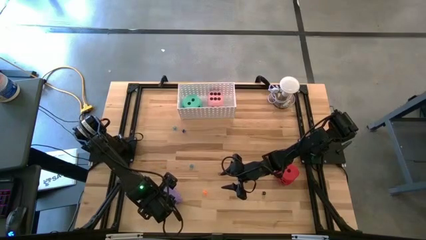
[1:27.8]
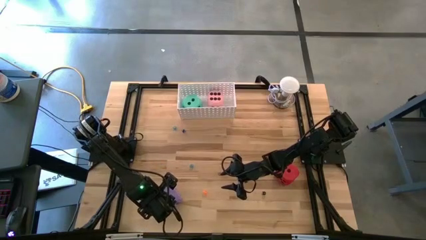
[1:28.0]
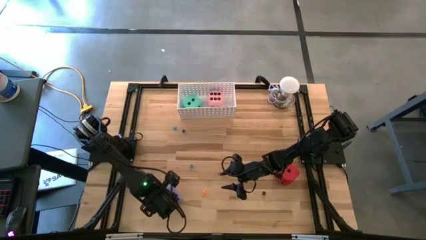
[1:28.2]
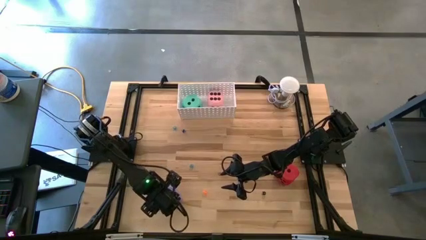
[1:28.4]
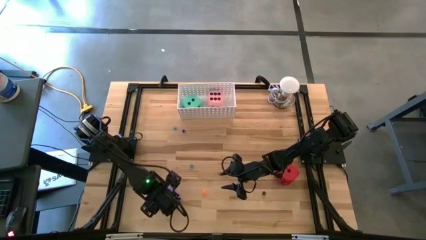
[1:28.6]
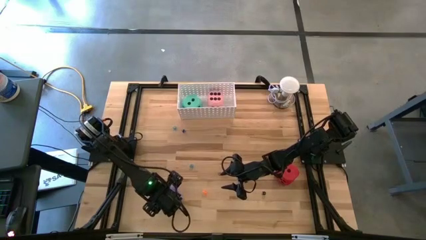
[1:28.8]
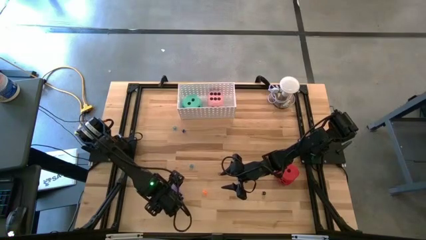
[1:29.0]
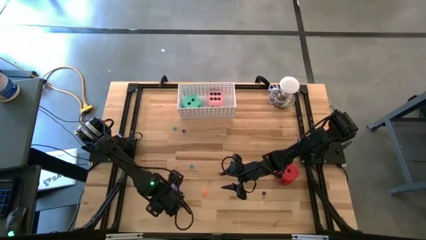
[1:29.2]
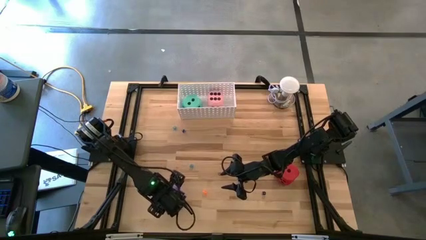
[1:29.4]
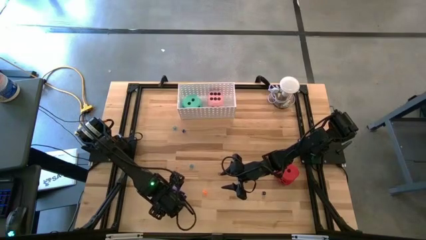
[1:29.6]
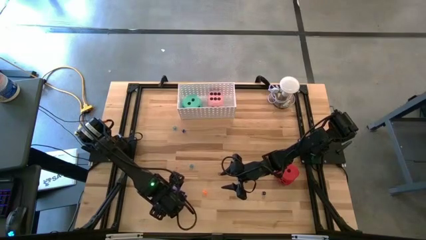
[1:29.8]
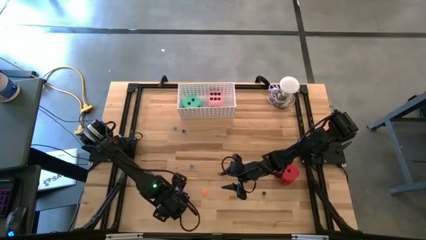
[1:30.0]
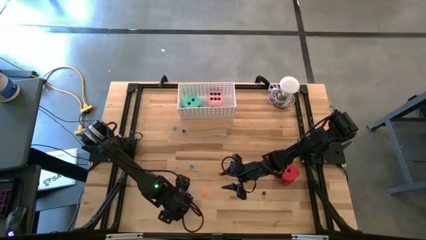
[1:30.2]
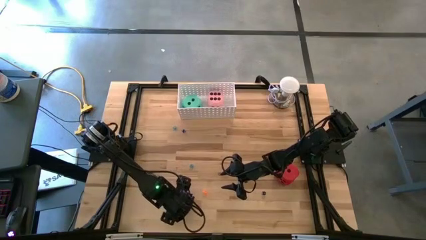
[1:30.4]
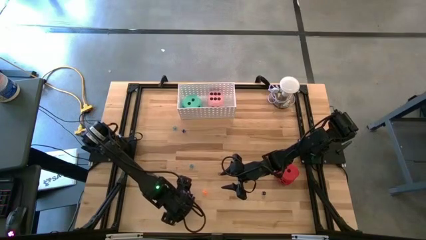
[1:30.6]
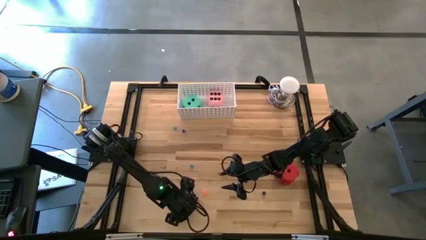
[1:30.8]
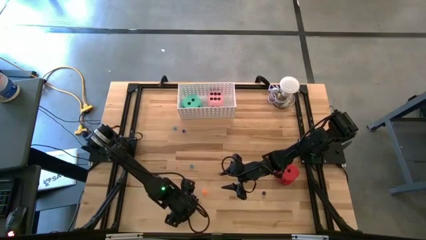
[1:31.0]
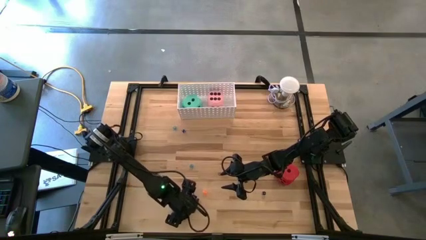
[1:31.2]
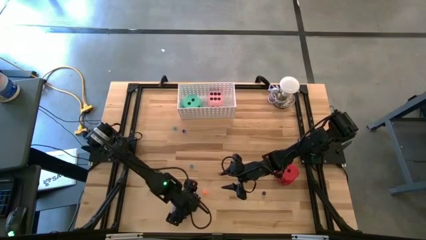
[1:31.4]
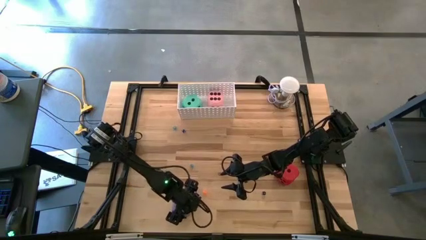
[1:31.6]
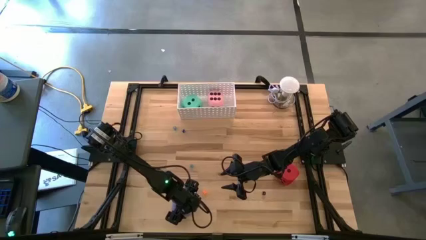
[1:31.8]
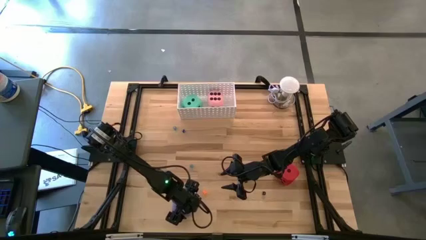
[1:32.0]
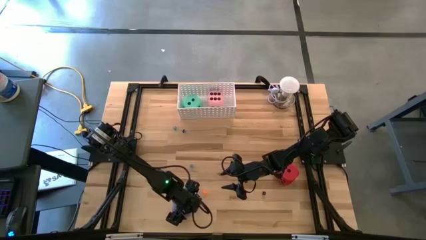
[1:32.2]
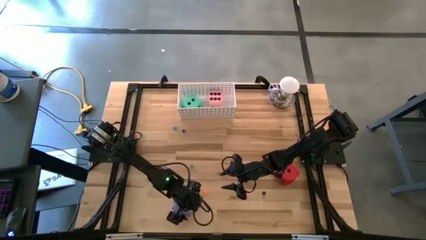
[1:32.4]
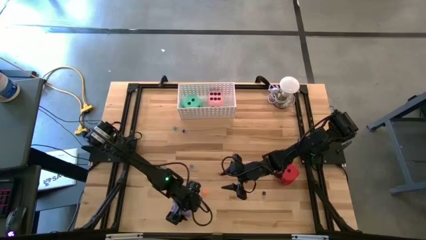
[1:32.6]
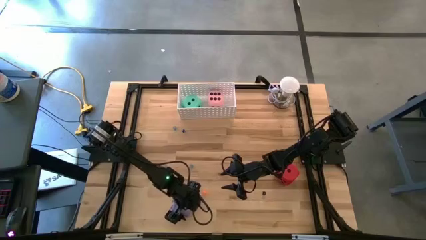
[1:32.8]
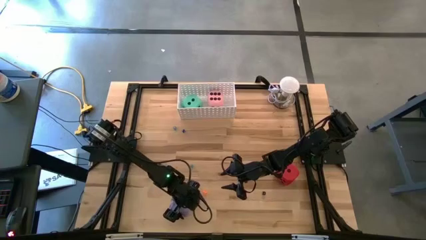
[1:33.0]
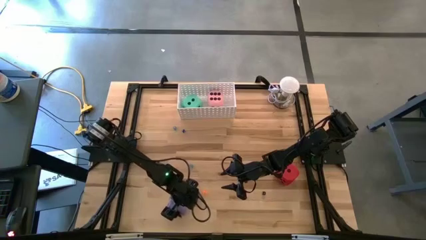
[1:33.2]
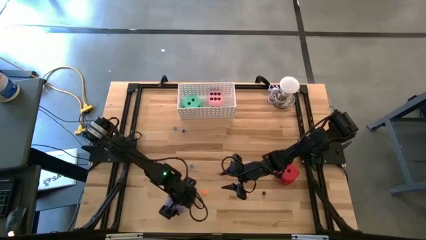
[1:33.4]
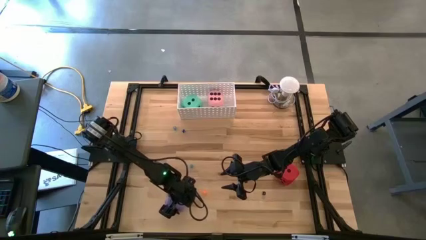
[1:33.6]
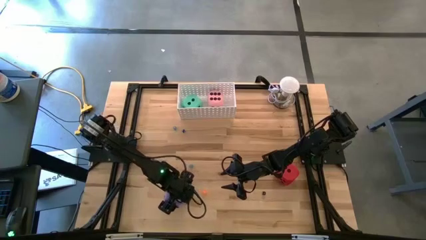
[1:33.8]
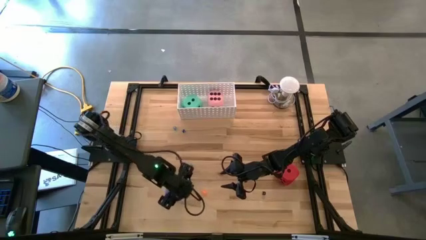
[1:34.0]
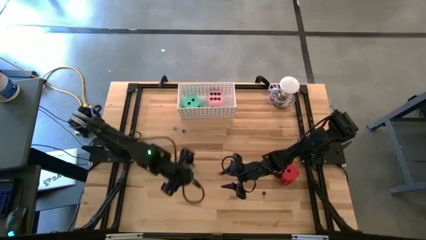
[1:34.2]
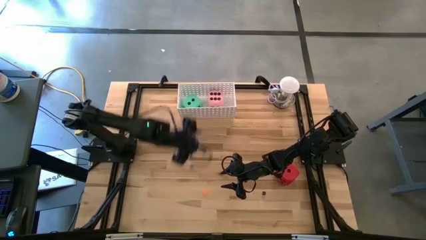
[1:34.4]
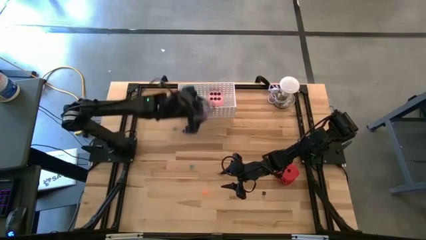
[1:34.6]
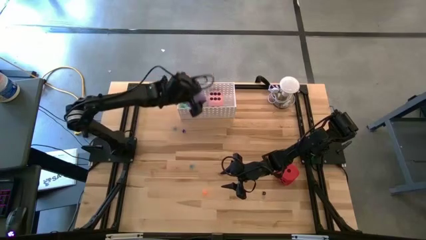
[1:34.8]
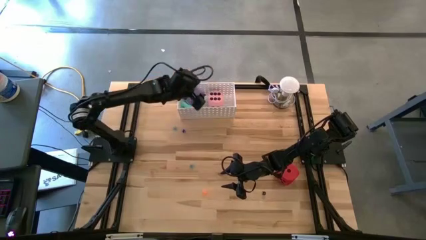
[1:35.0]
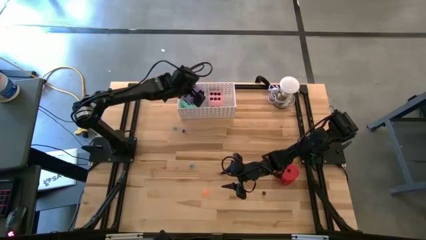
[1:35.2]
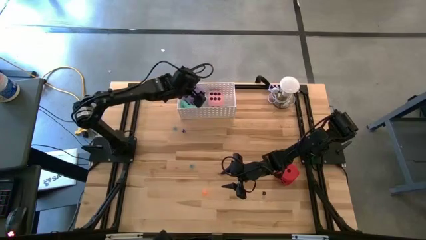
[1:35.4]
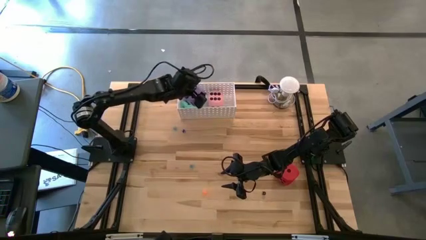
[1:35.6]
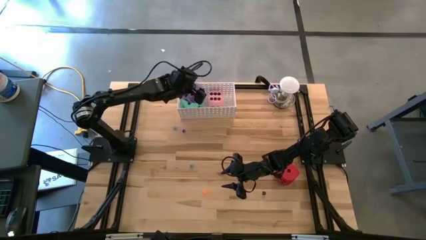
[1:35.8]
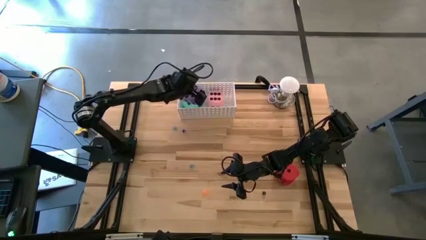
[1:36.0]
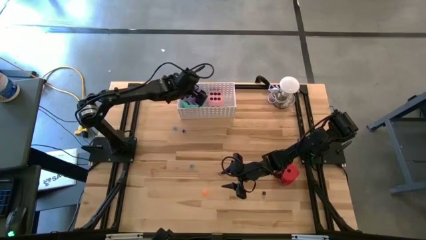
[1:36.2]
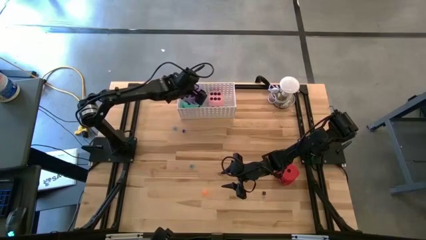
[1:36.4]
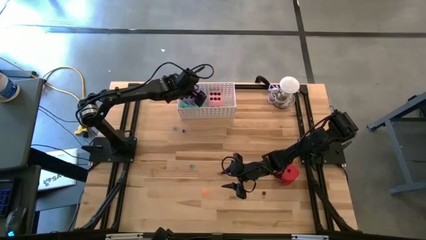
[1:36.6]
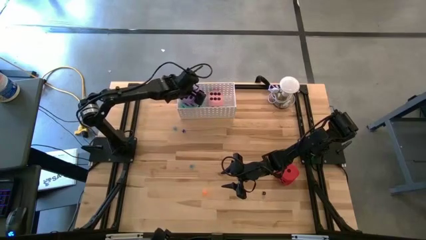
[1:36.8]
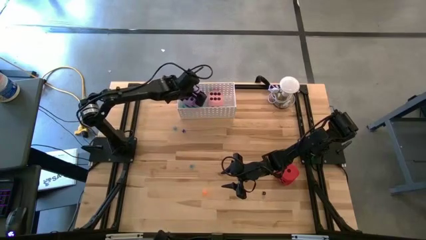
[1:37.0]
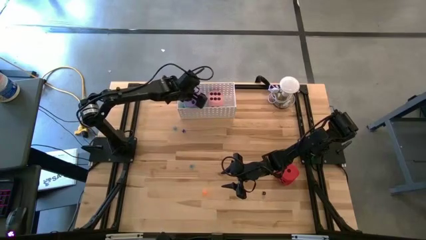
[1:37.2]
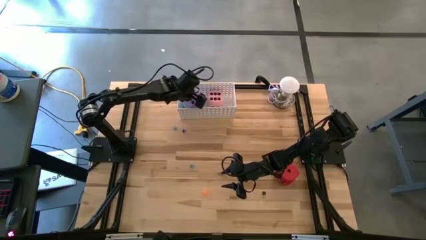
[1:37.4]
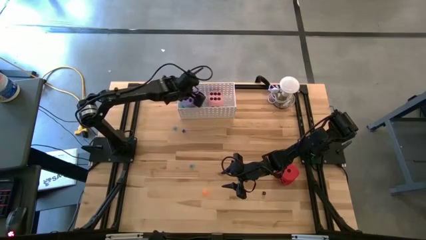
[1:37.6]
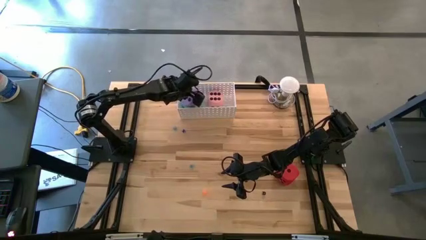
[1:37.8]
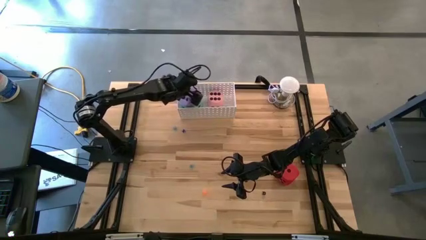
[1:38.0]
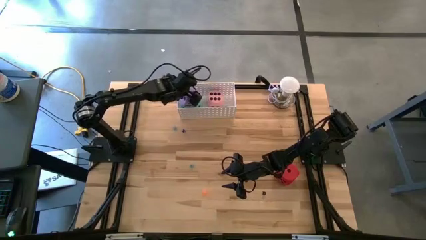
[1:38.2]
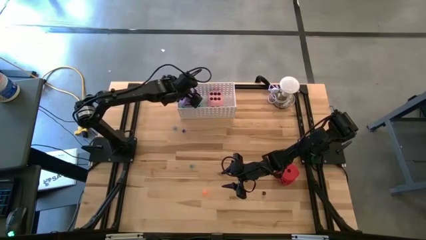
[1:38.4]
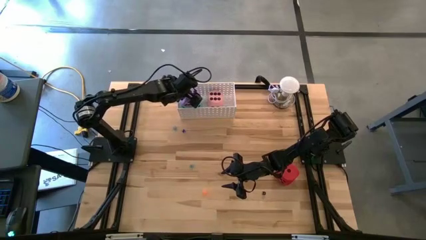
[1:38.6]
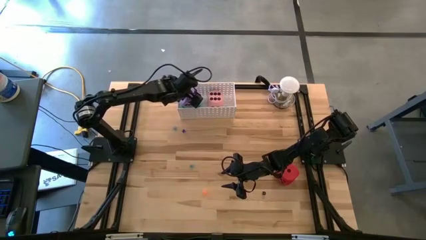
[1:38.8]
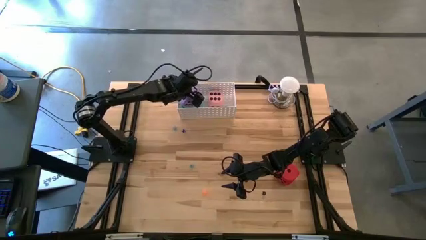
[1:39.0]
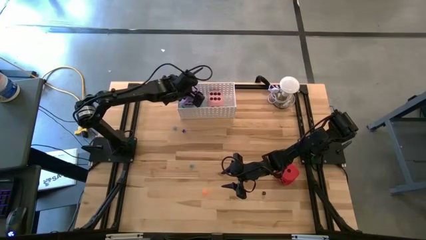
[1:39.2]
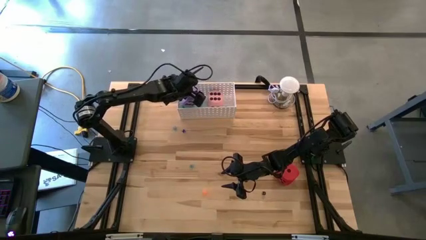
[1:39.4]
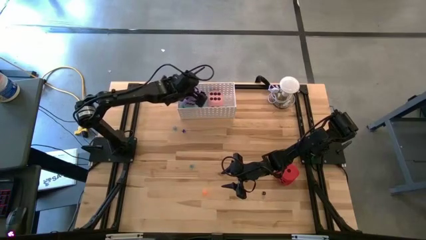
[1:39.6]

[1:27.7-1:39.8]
Task: Pick & Place Dice
Put the large violet dice into the white basket

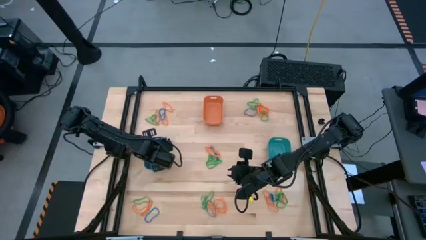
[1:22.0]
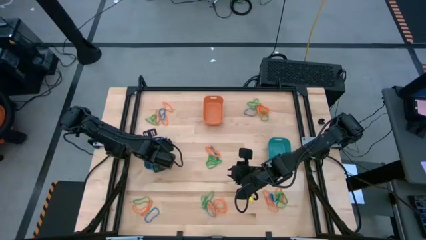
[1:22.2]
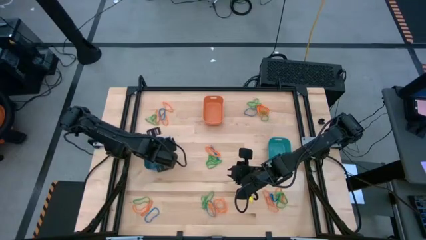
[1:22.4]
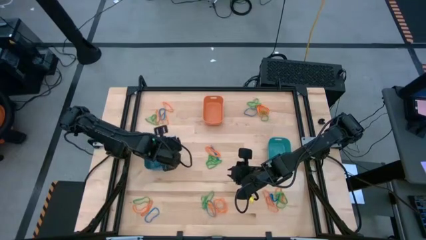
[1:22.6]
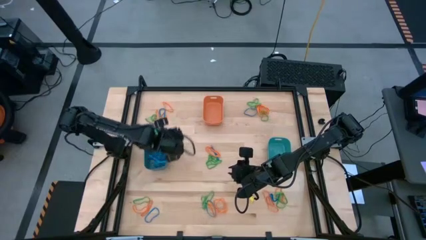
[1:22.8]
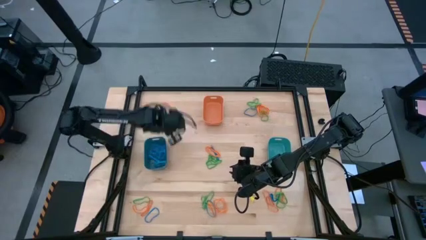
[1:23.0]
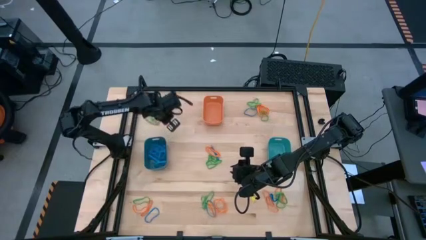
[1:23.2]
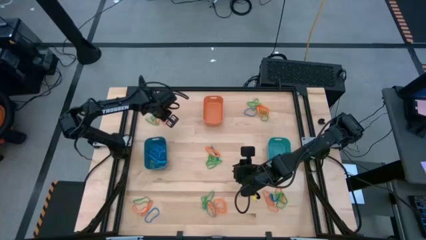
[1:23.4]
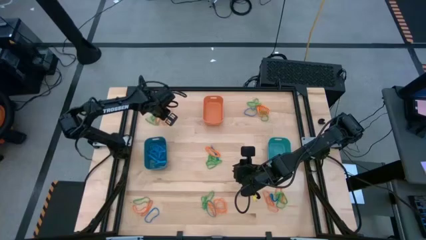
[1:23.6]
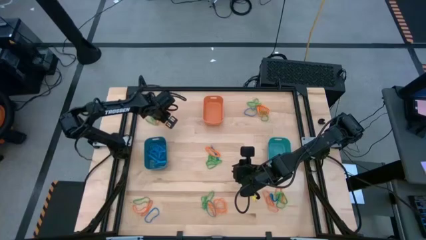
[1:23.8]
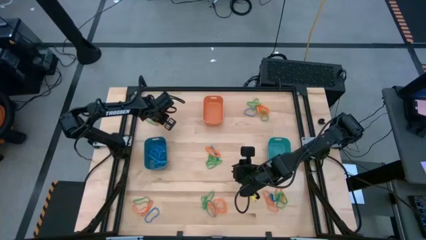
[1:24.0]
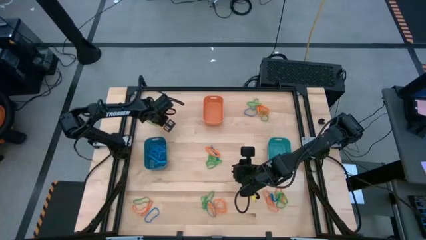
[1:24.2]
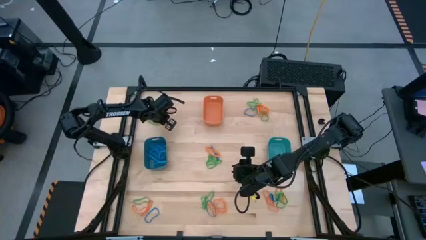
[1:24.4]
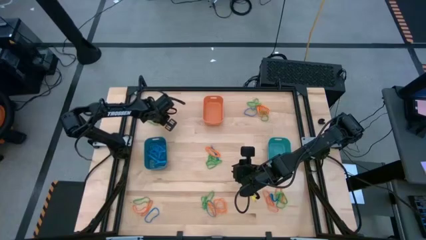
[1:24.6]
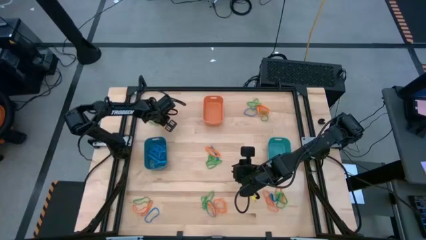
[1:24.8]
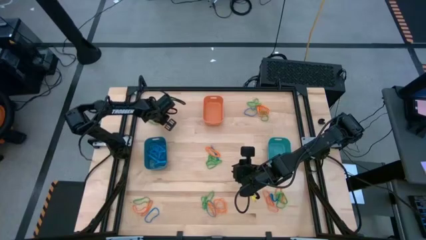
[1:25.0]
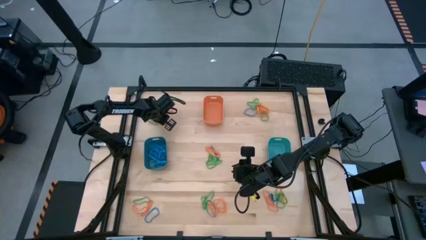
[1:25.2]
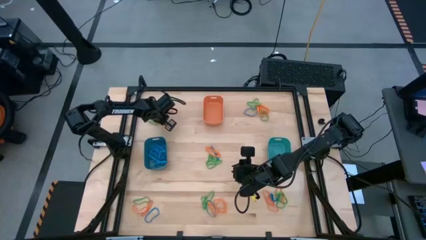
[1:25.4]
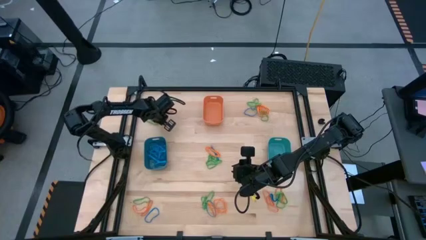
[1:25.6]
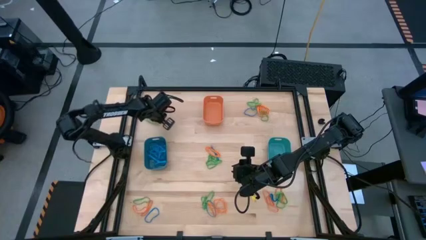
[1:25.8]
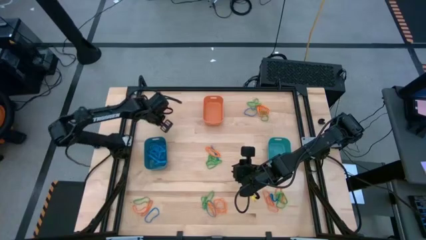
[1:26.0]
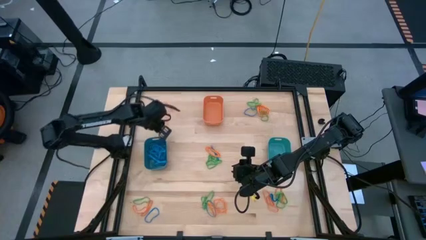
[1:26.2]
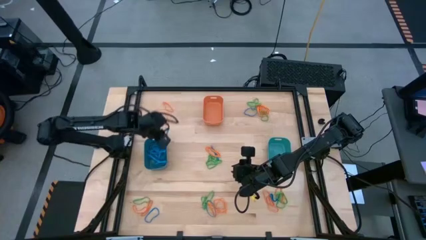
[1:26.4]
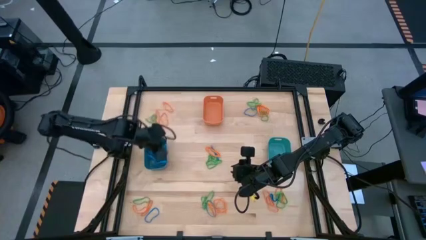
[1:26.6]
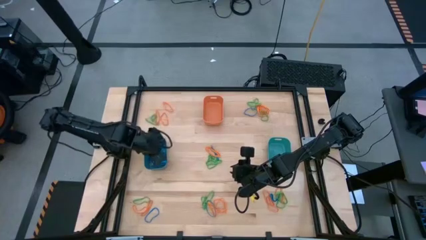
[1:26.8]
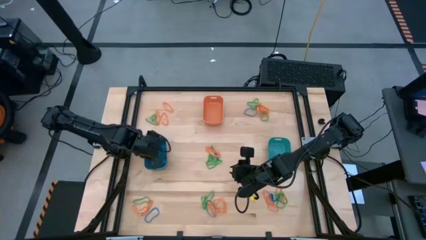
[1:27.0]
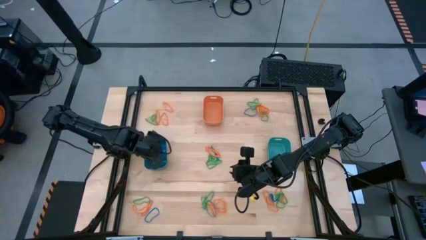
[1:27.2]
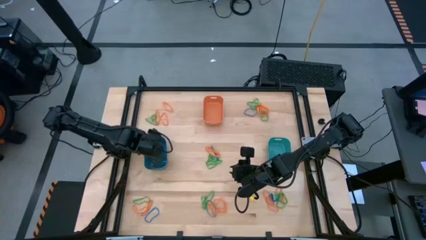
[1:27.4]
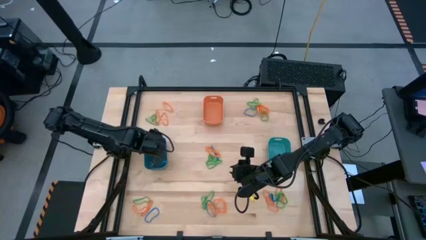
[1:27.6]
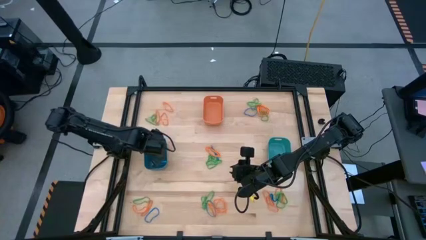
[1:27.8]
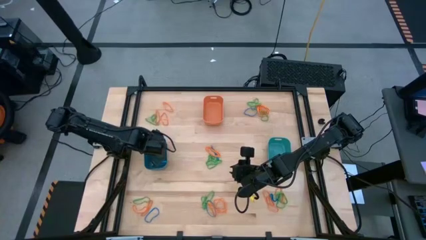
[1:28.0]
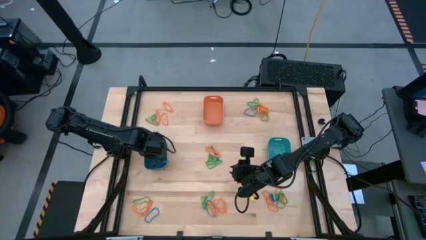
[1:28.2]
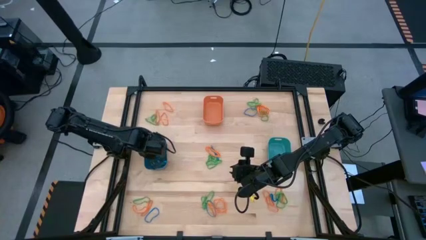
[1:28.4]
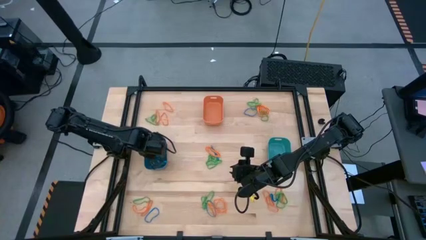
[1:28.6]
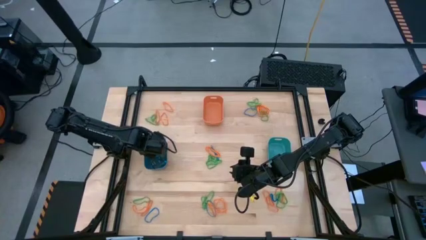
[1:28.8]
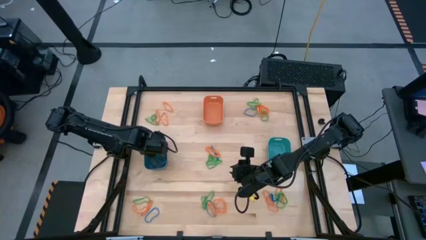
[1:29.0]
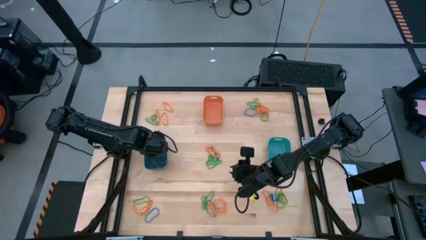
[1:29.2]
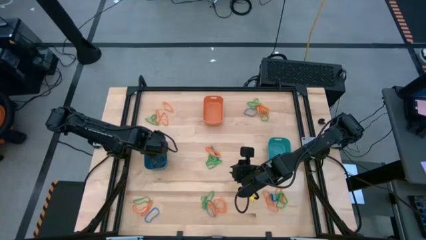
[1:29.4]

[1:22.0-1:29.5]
Task: Sort rubber bands into baskets
Put the blue rubber band into the blue bin
